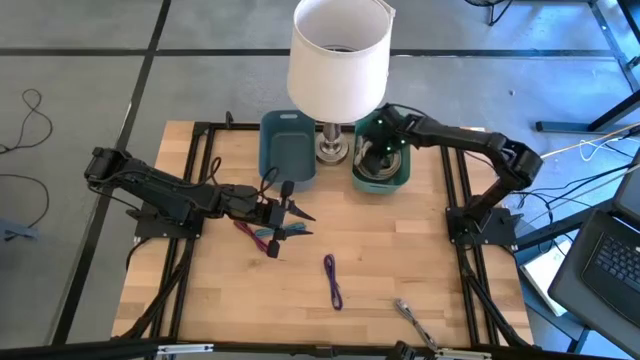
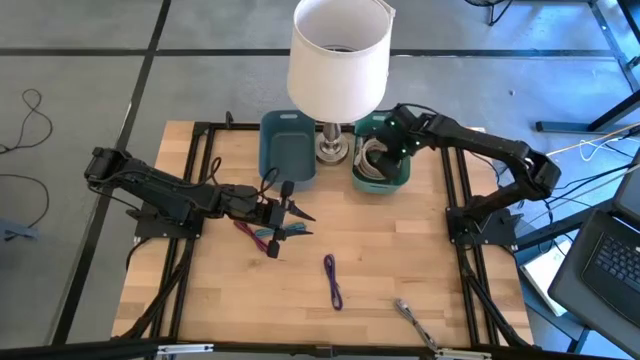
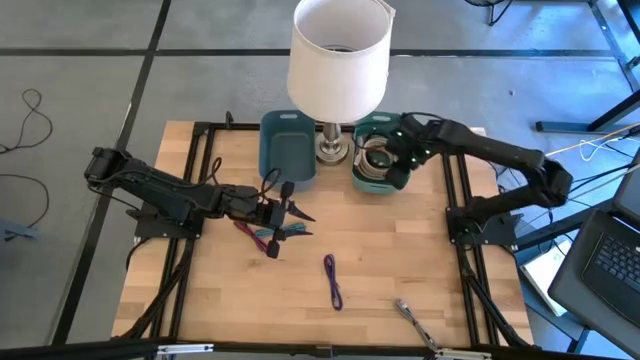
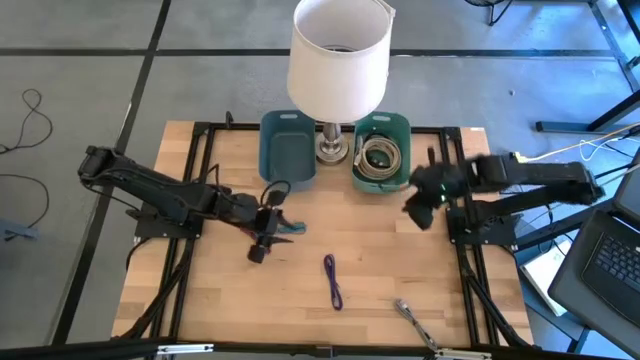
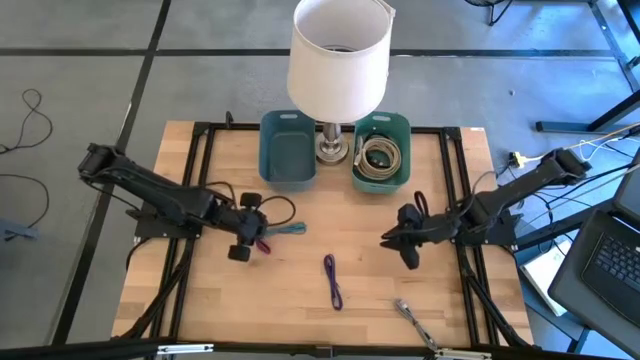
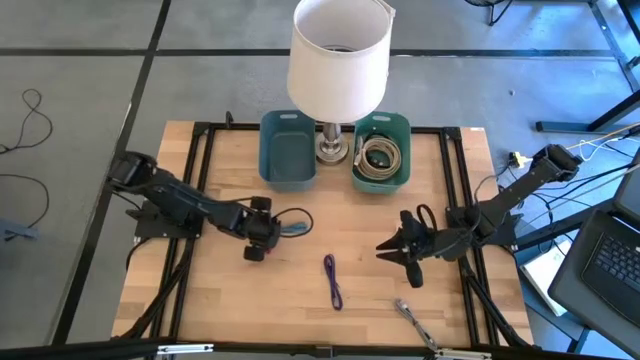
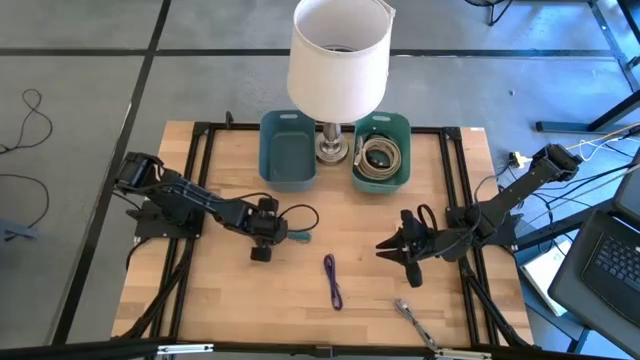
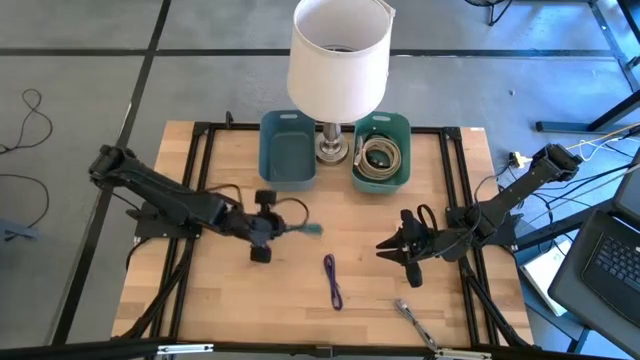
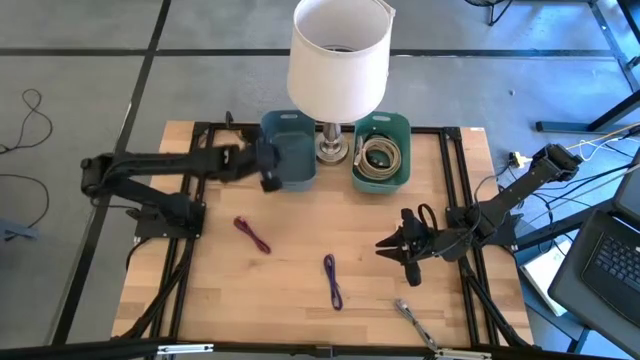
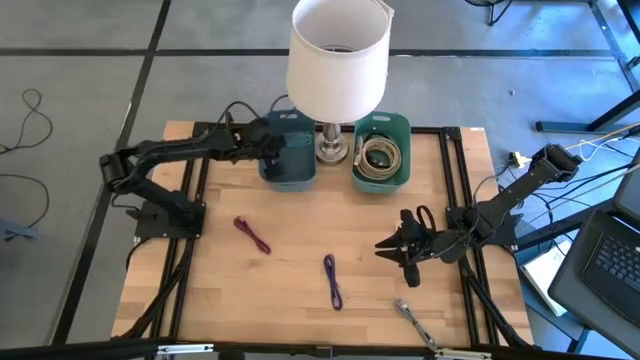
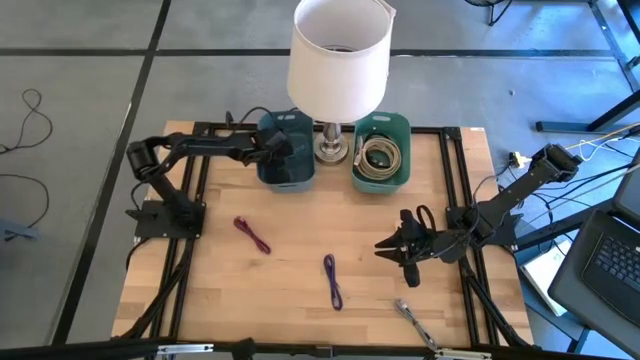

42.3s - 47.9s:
Put the blue usb cable into the blue bin

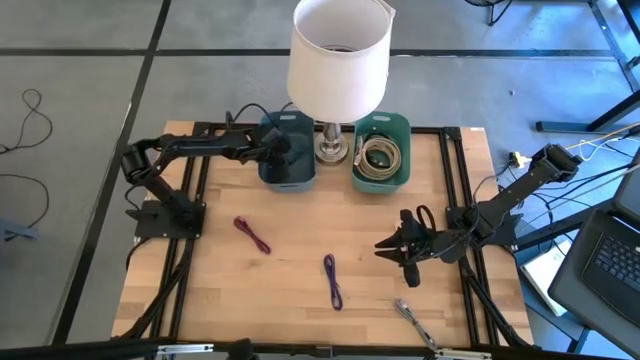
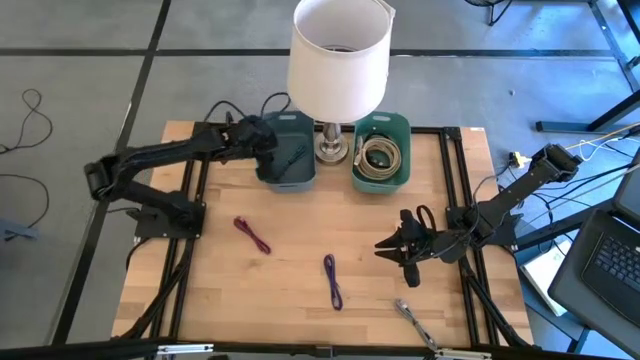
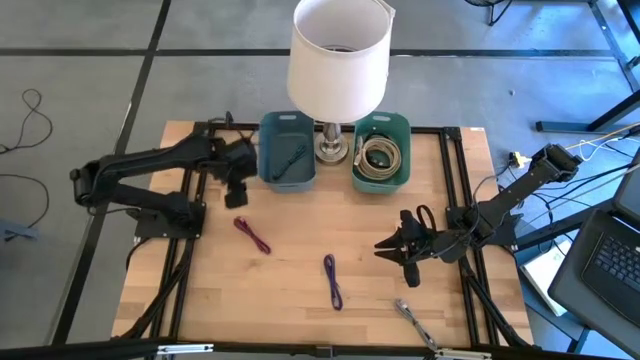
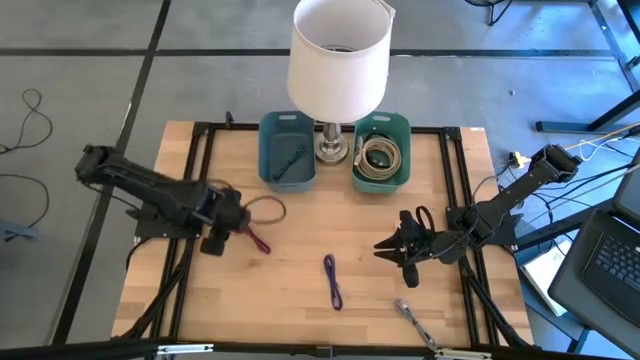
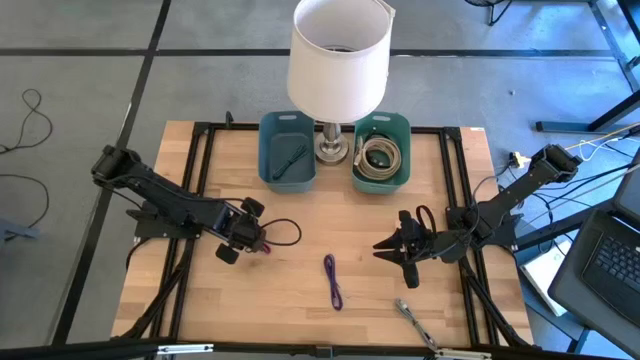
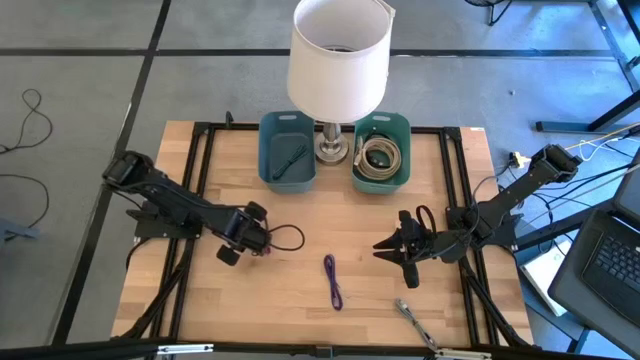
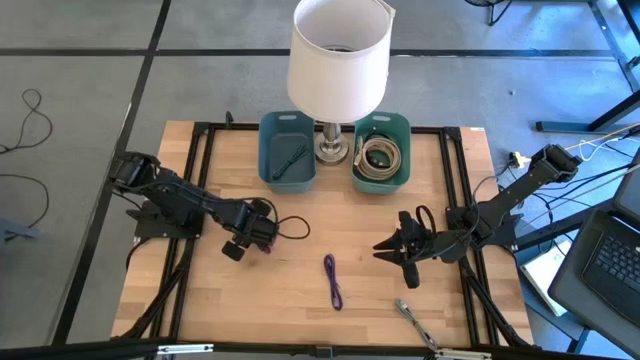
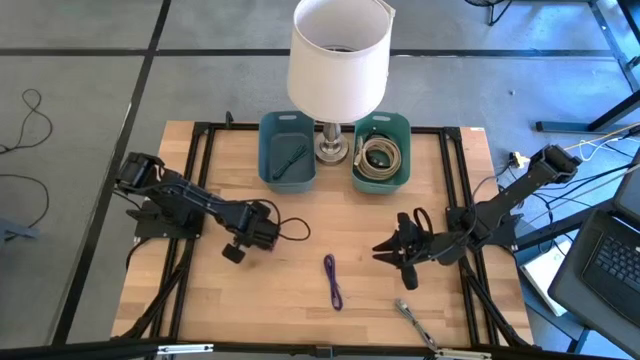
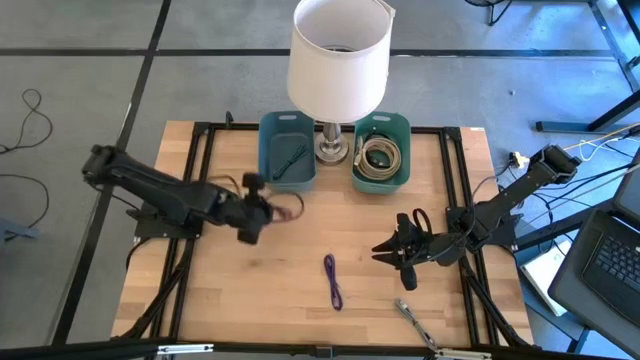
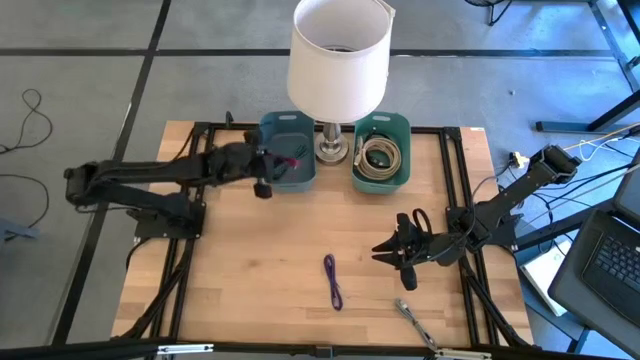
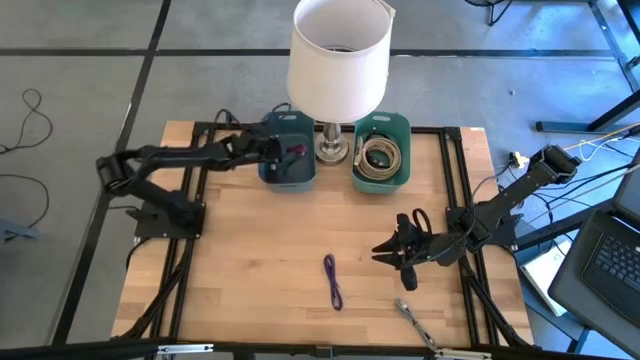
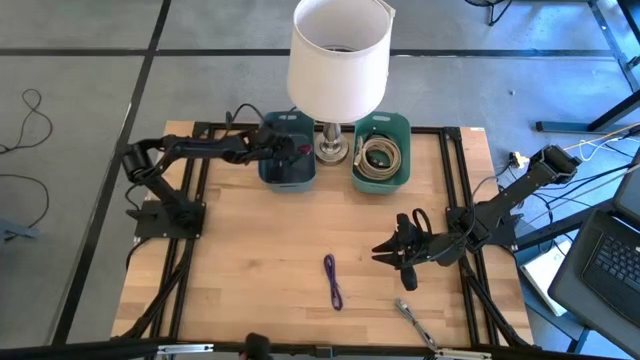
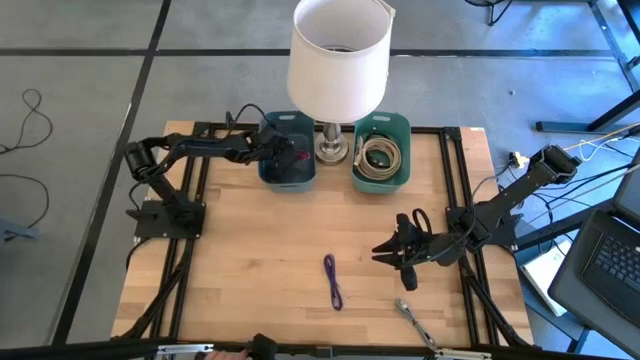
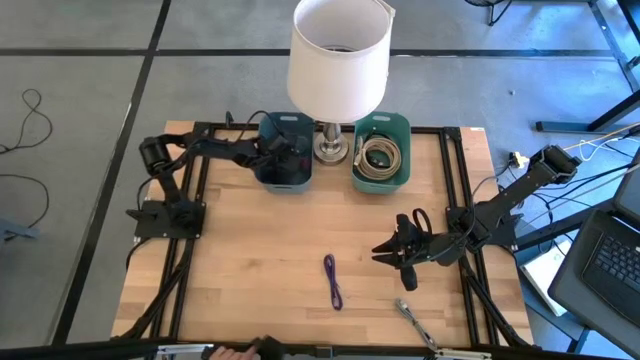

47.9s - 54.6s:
Put the pink usb cable into the blue bin

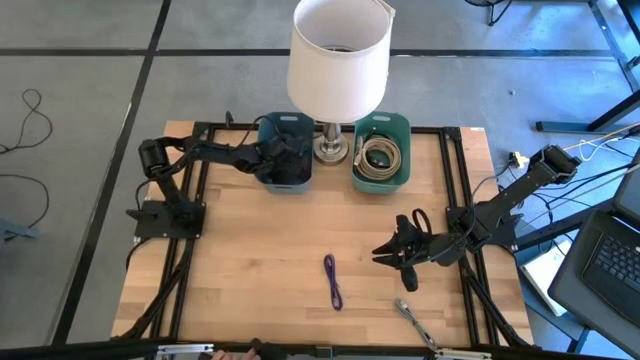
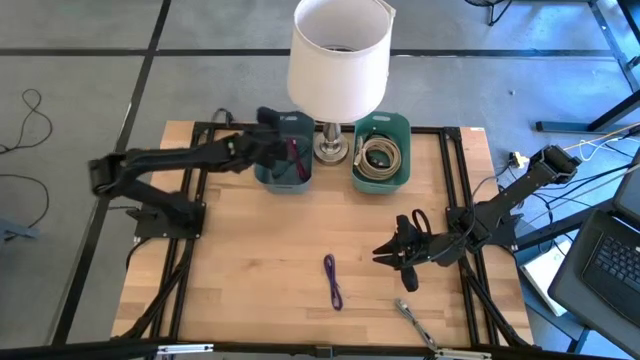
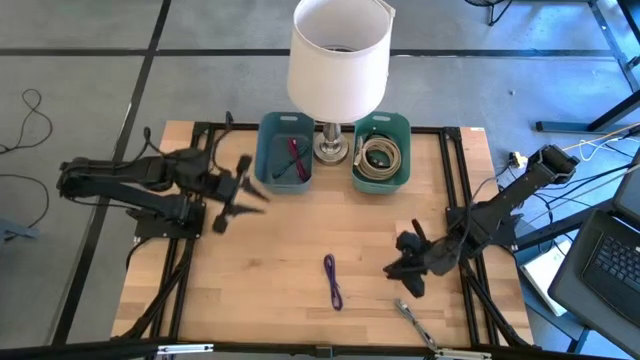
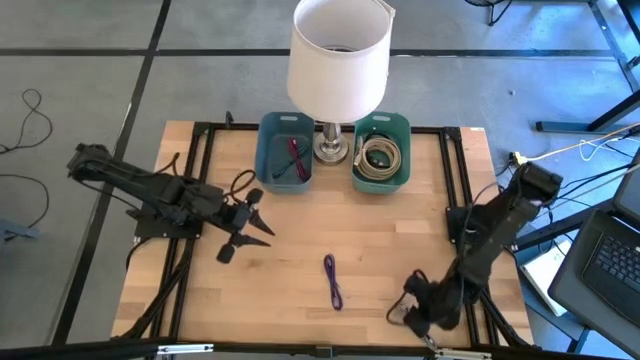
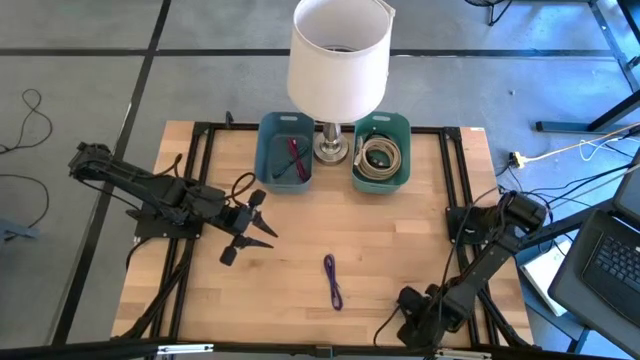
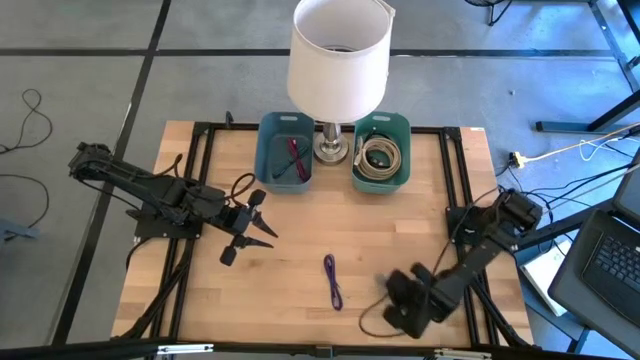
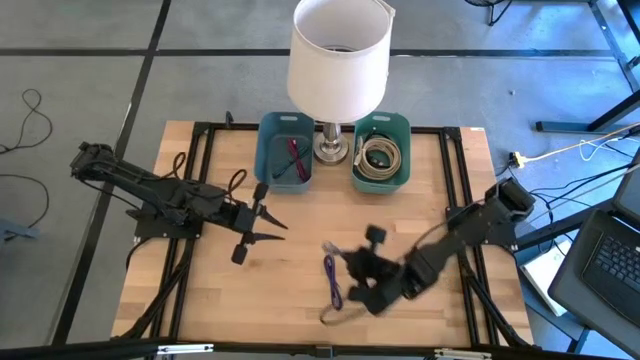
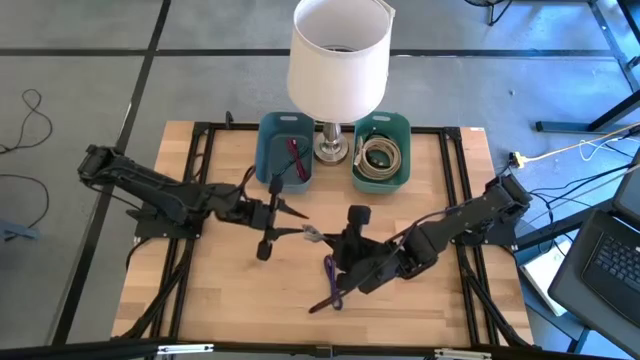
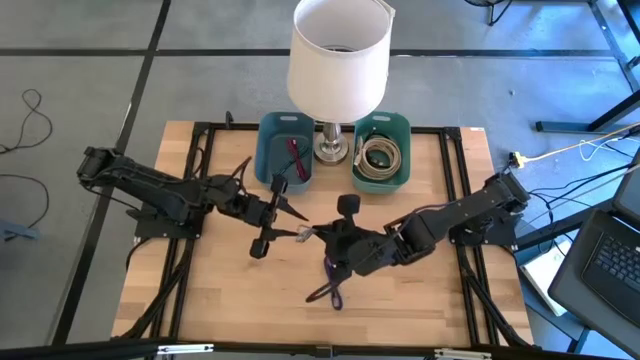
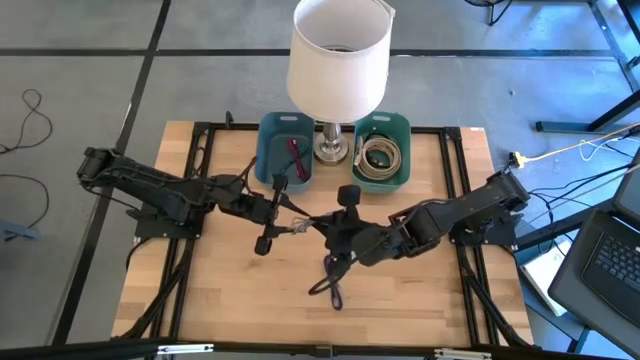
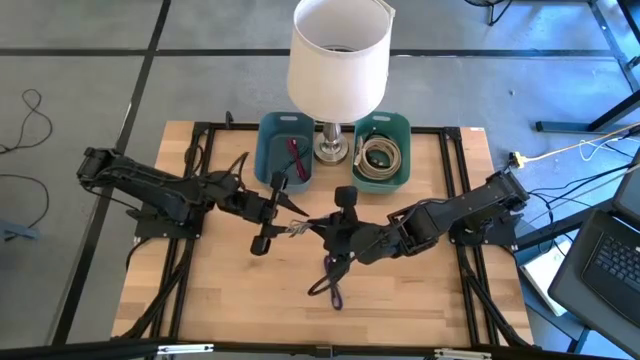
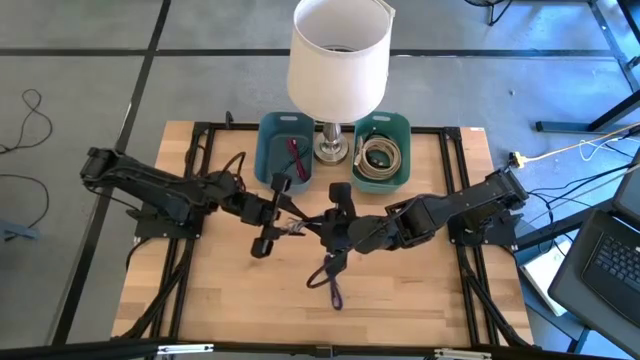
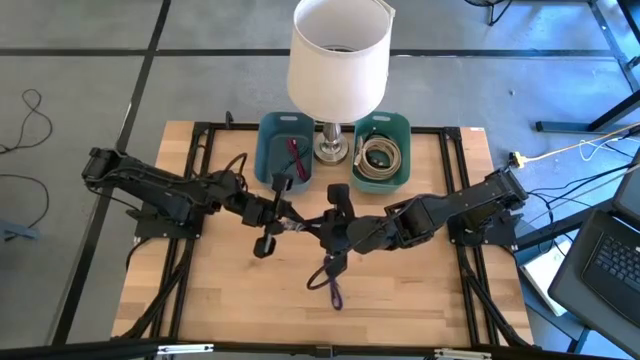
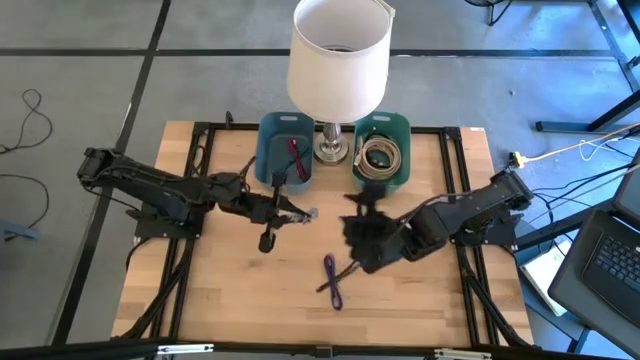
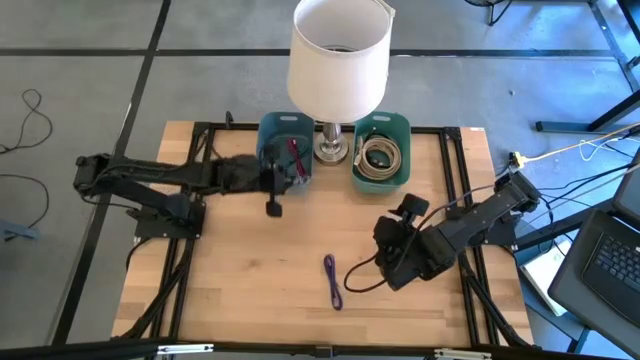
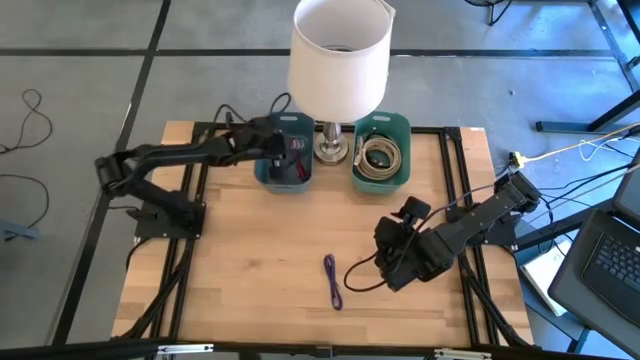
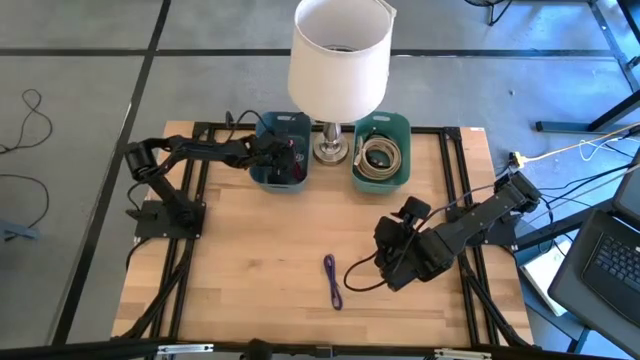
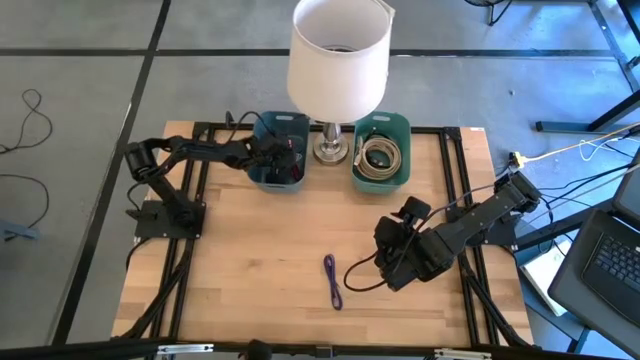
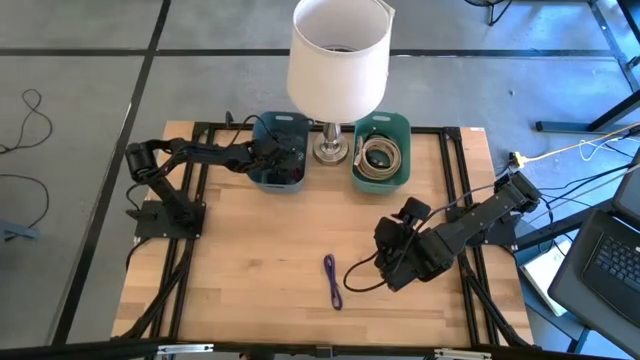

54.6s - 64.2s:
Put the white usb cable into the blue bin
